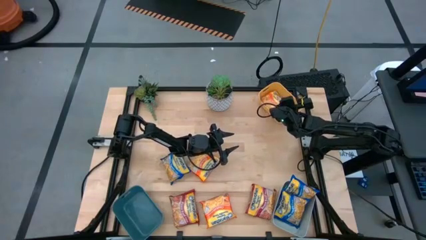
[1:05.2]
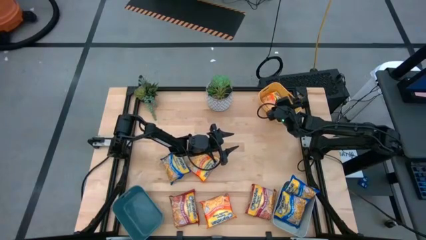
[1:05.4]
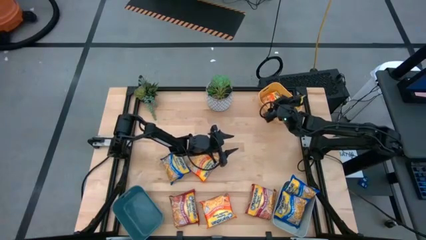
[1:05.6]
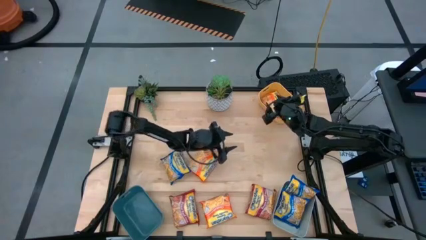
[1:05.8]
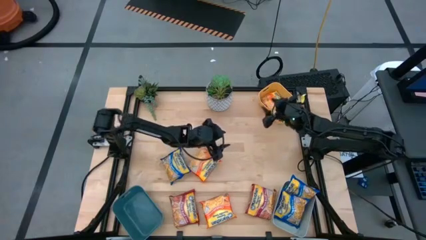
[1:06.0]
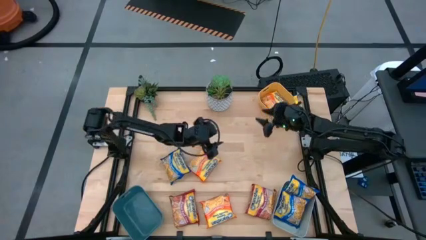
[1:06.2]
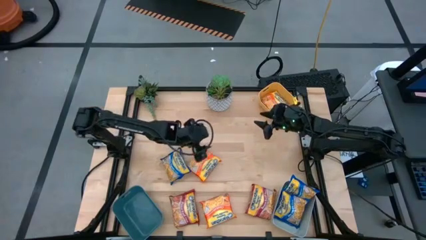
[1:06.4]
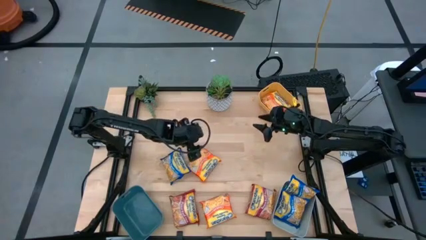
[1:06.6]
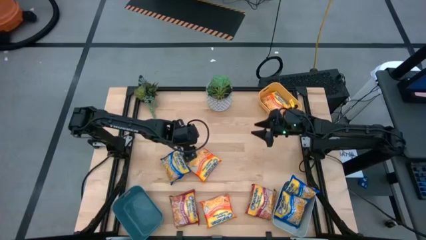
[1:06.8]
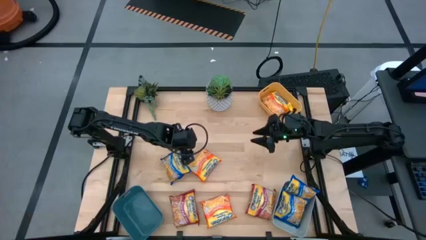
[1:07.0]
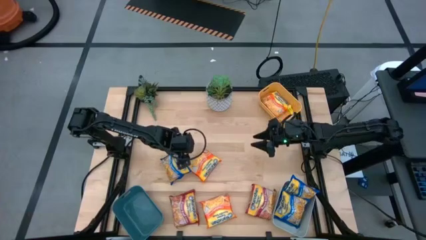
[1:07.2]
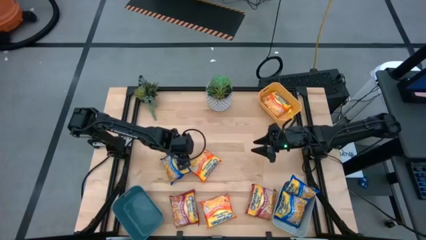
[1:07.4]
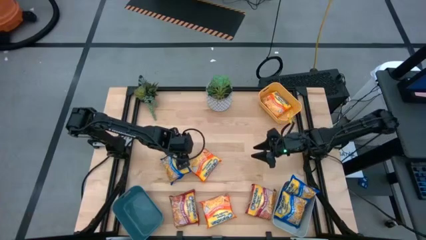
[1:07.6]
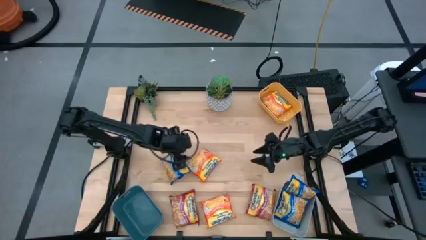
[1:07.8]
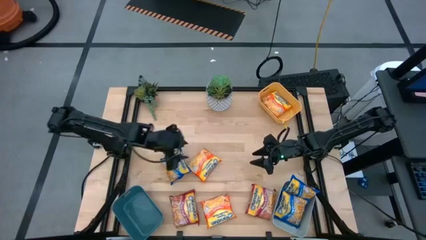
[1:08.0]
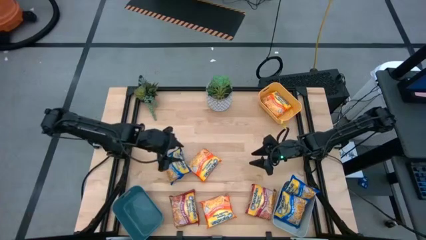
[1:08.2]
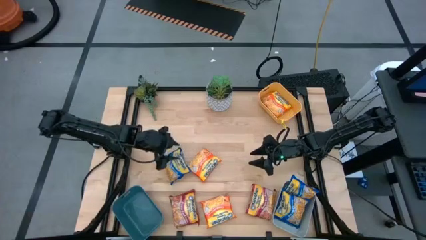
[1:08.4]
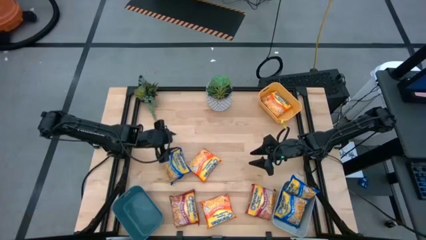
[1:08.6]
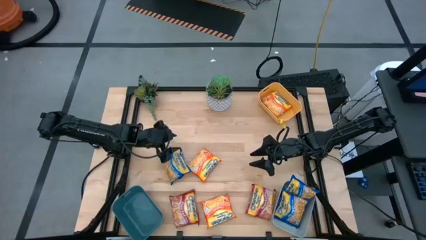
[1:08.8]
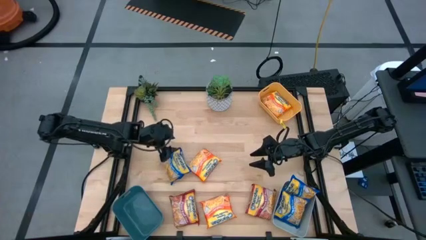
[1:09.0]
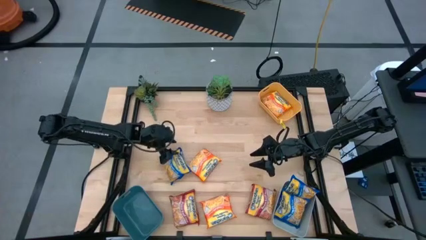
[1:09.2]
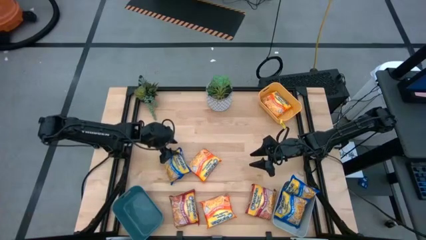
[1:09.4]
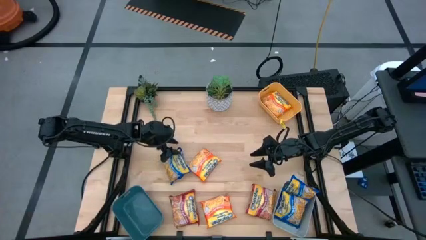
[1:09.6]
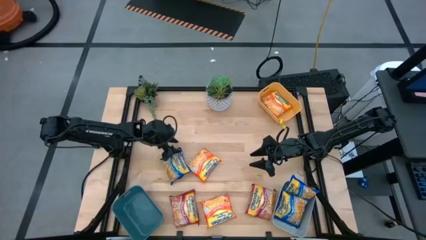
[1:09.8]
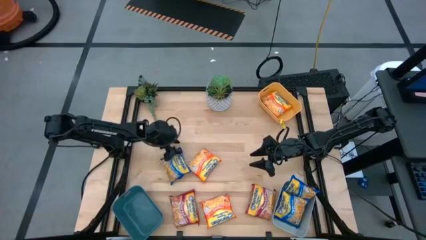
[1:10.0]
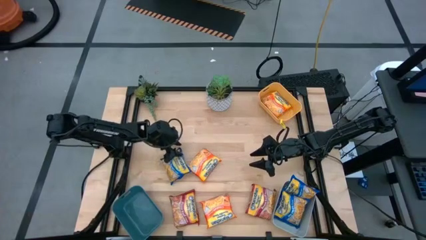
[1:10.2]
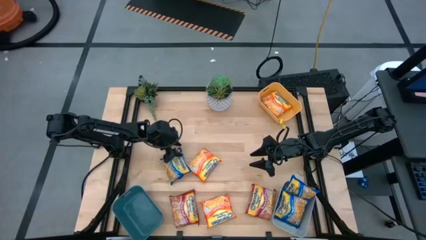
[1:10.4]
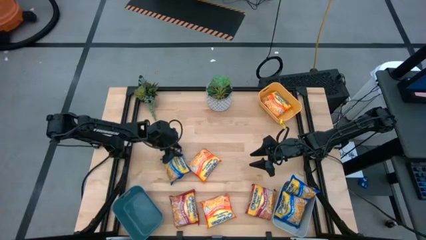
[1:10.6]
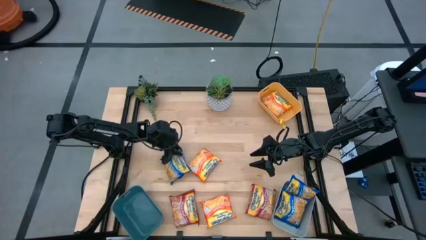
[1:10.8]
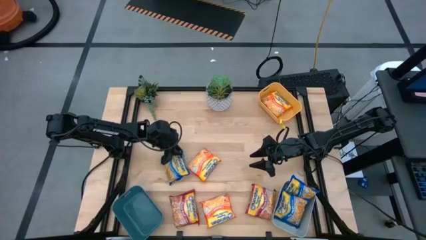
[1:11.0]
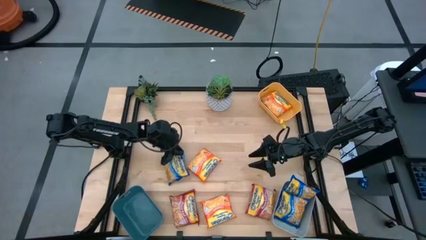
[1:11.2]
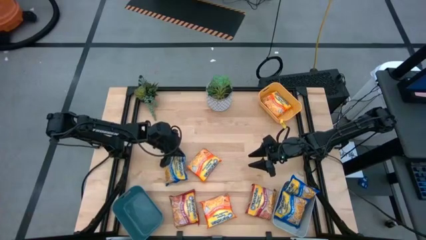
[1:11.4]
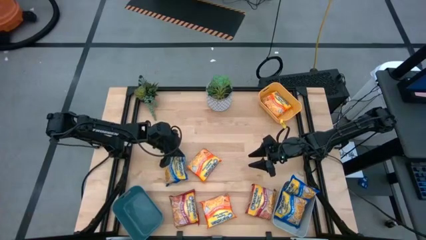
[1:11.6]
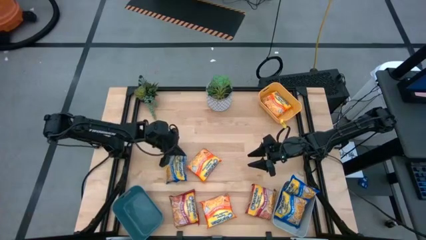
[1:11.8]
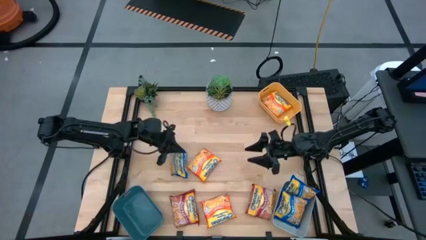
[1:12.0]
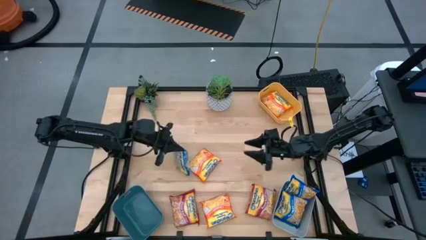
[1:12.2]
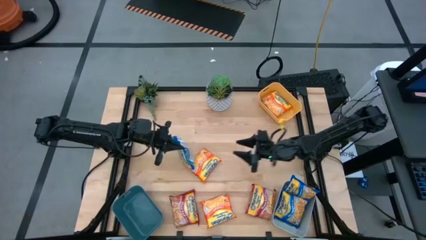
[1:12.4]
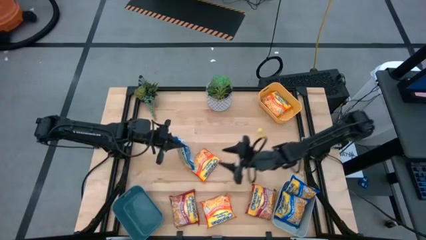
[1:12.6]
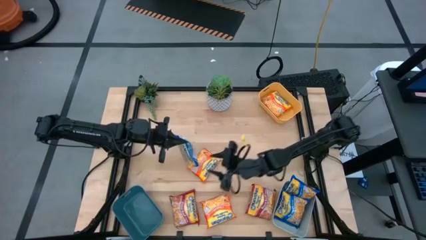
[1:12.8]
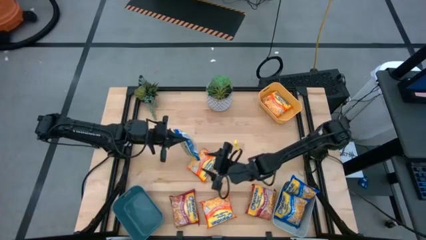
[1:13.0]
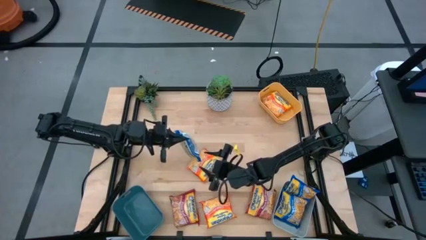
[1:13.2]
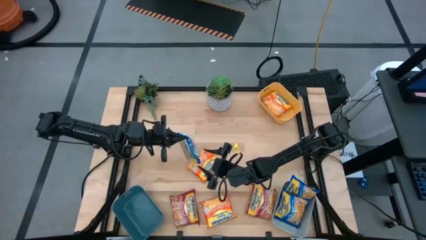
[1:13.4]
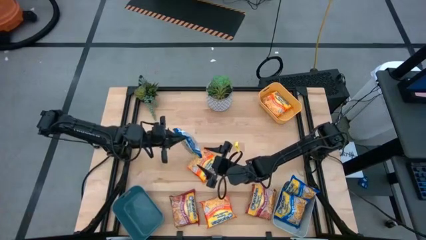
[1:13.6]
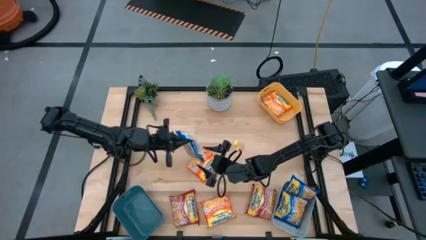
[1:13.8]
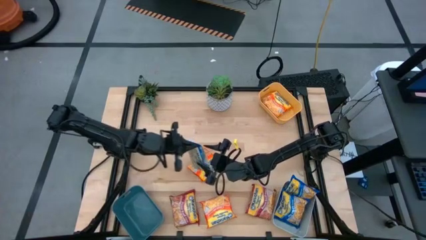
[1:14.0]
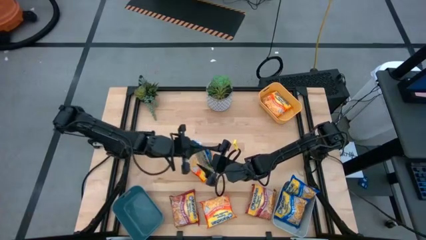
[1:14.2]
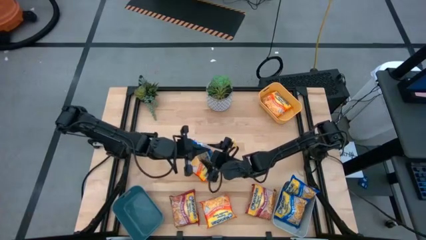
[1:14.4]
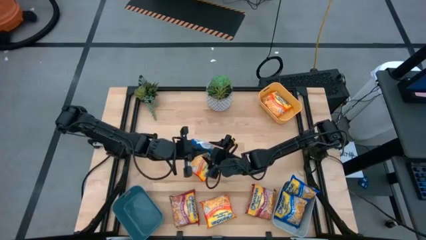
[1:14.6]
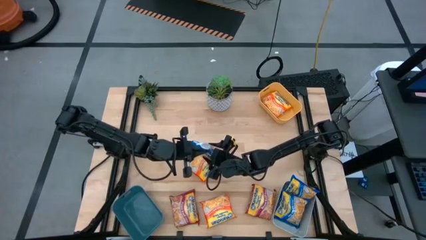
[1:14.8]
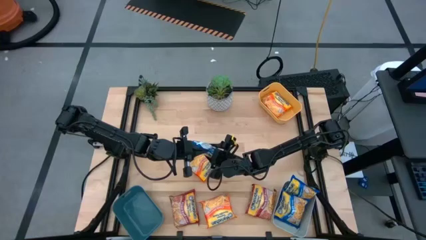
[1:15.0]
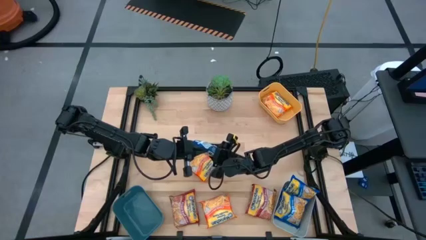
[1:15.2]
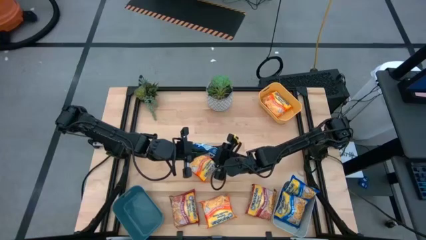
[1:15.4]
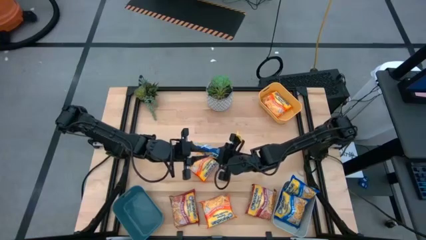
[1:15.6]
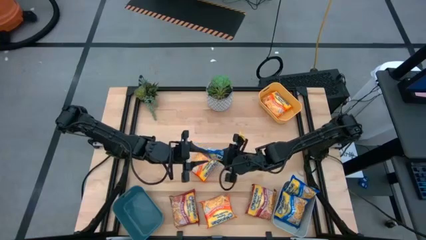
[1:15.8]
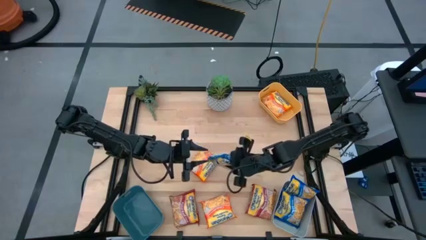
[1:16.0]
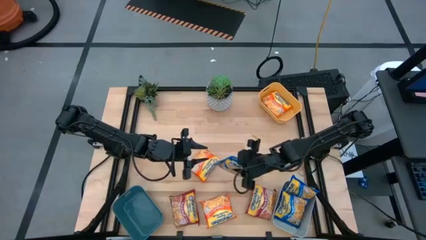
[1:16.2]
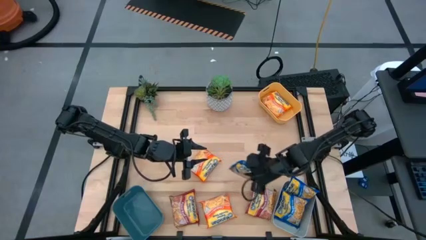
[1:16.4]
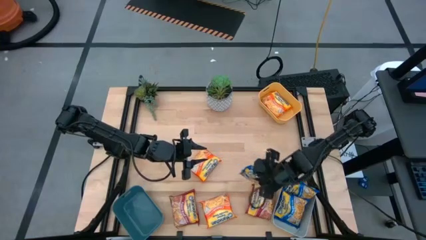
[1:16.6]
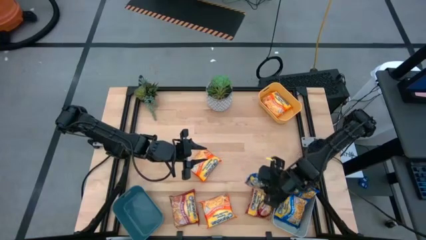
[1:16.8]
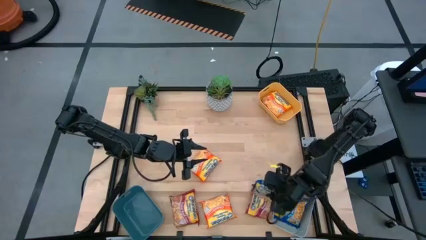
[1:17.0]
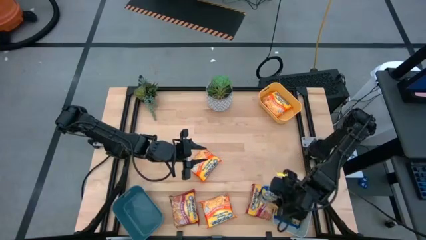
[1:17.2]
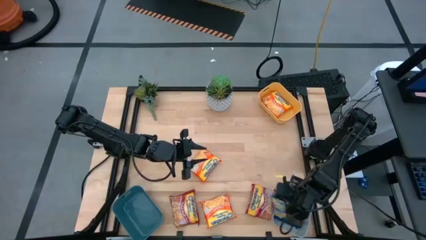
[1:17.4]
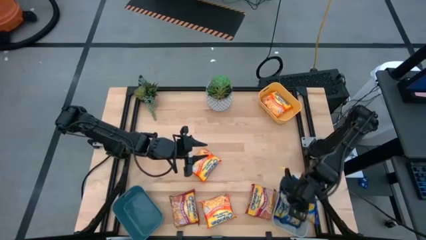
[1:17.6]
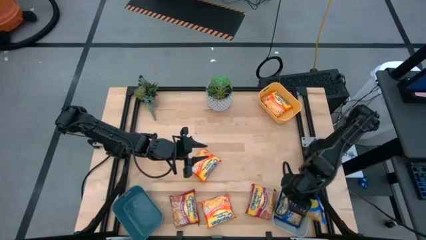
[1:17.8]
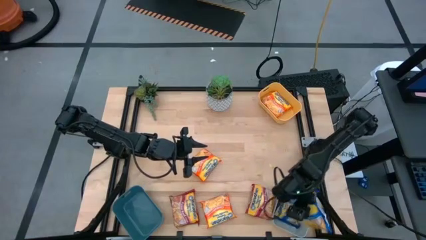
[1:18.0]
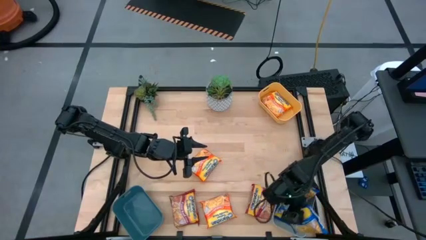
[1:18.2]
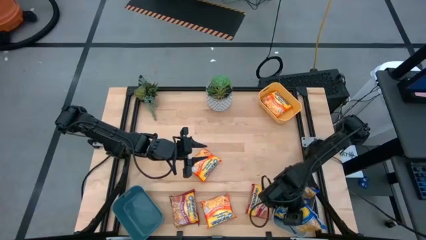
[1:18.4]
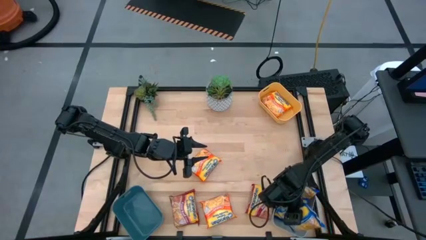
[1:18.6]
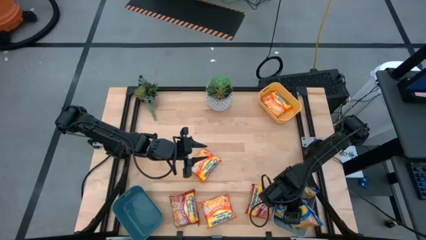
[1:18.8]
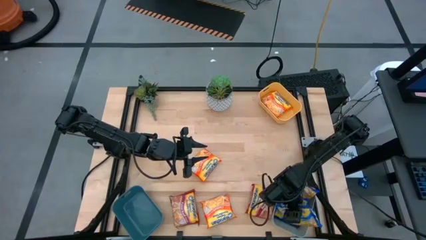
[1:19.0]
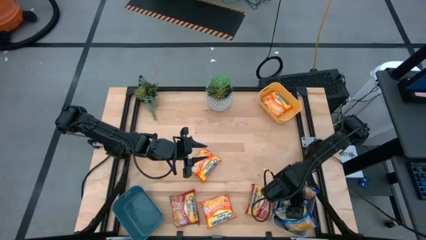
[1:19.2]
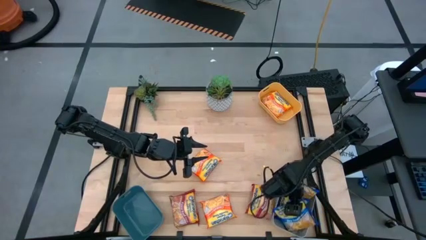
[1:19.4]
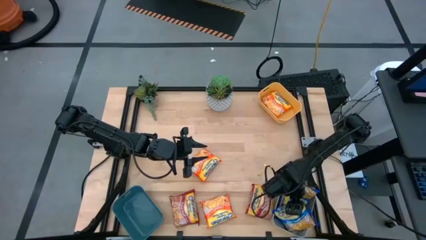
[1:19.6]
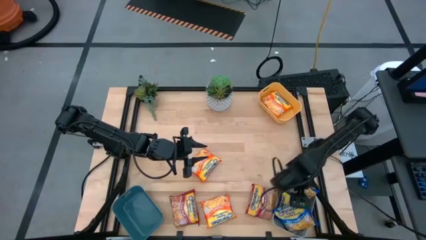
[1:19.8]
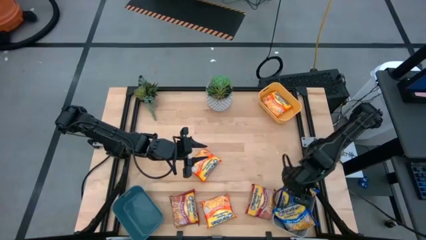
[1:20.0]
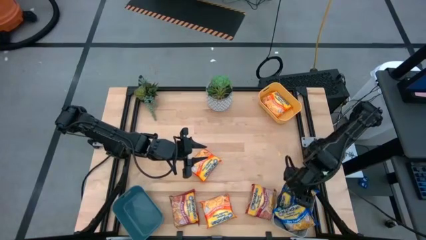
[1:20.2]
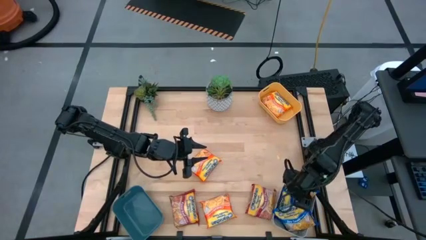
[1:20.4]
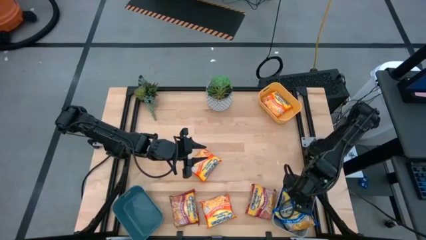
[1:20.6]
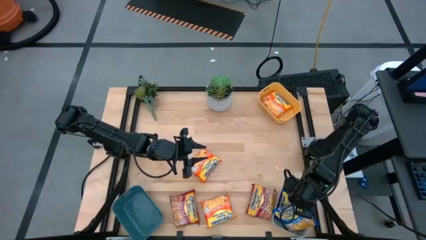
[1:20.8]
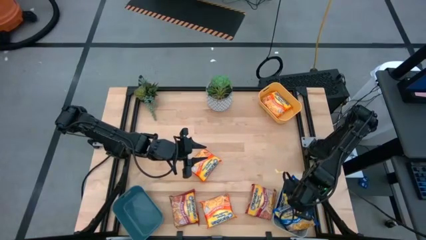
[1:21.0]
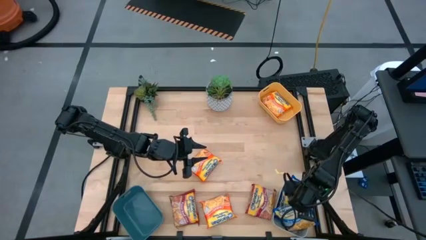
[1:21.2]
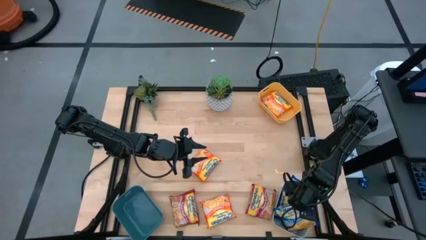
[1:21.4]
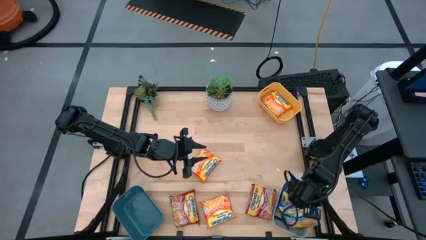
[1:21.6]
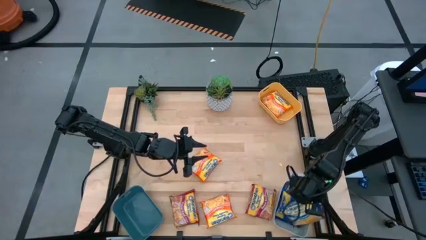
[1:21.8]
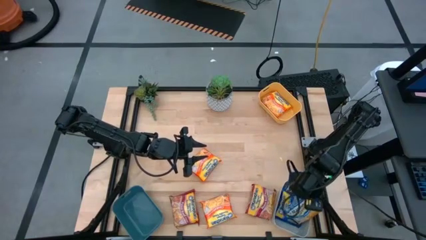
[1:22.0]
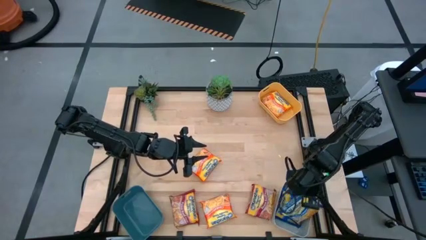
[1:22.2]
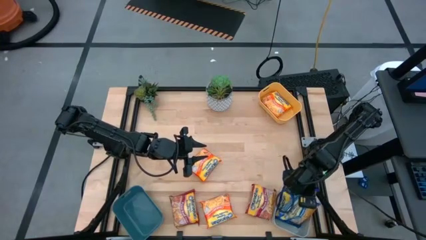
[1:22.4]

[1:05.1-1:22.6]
Task: Sort Maruchan noodles
Put the blue noodle pack into the gray bin
